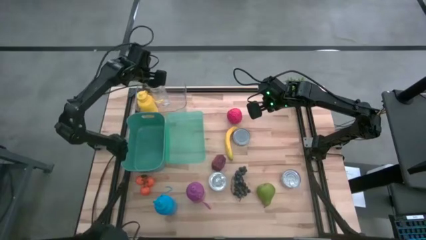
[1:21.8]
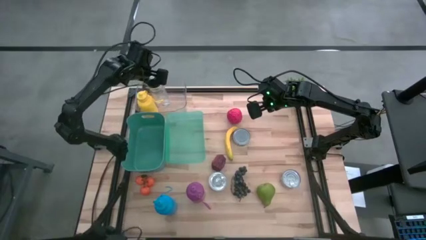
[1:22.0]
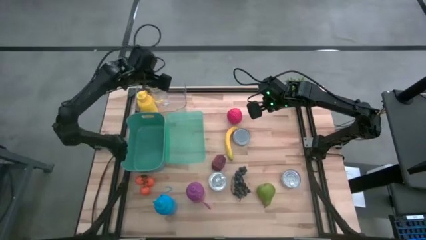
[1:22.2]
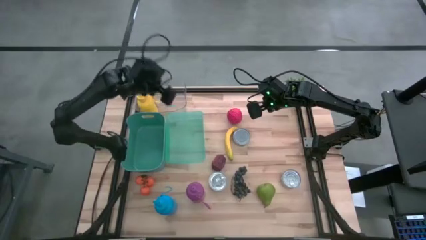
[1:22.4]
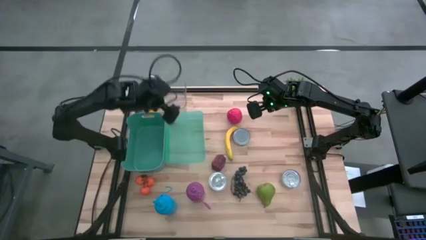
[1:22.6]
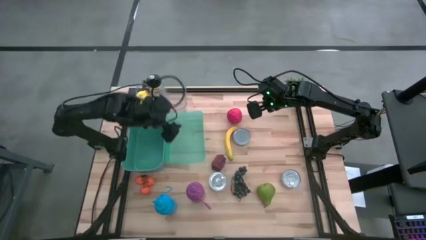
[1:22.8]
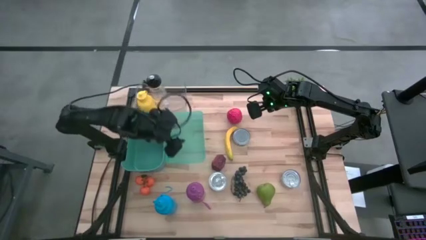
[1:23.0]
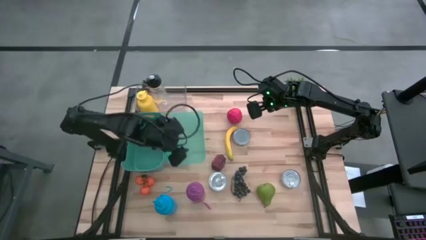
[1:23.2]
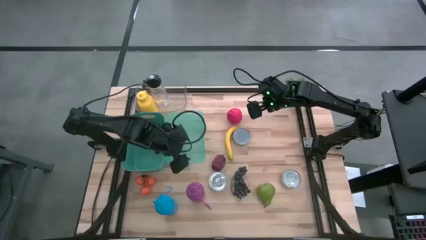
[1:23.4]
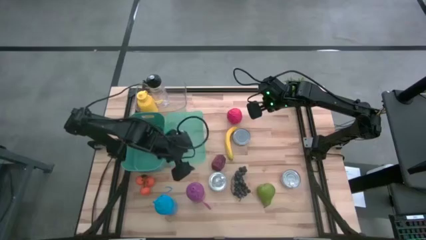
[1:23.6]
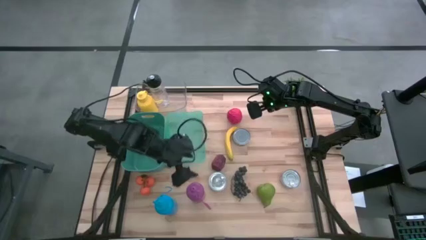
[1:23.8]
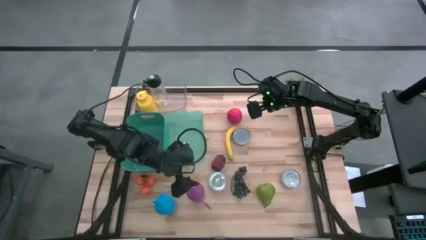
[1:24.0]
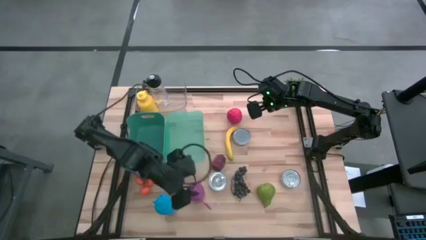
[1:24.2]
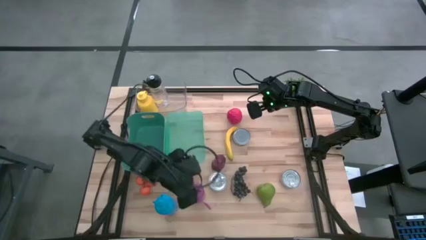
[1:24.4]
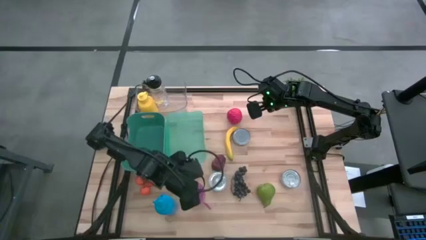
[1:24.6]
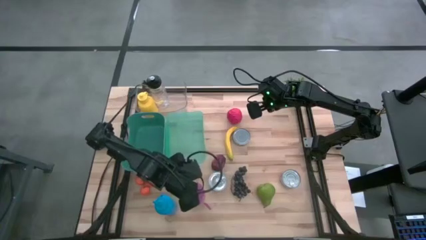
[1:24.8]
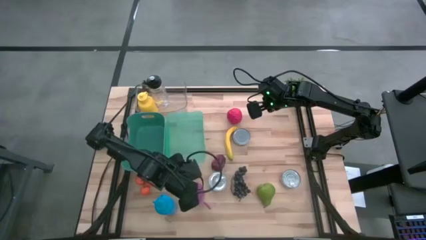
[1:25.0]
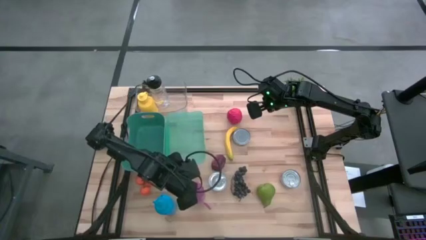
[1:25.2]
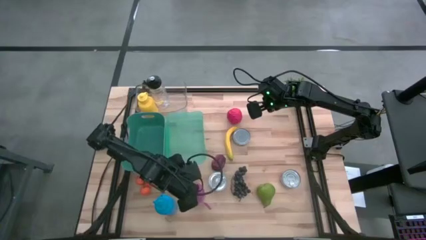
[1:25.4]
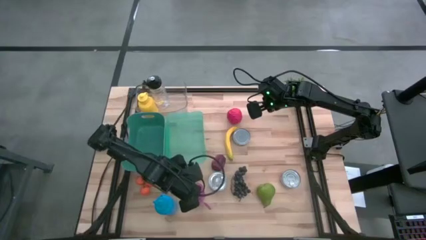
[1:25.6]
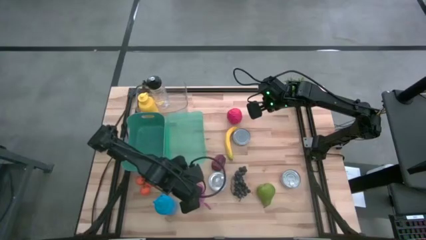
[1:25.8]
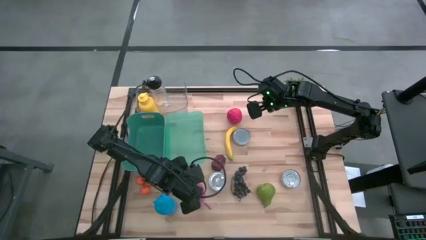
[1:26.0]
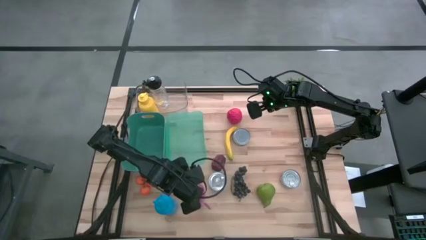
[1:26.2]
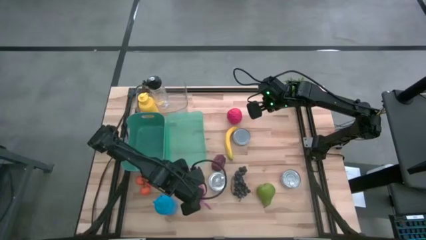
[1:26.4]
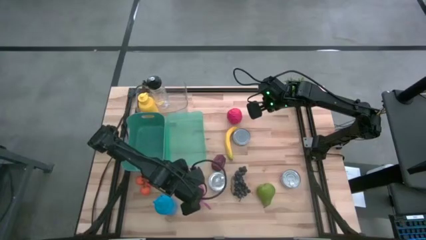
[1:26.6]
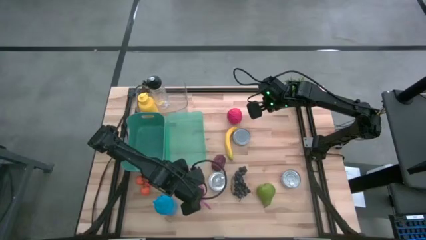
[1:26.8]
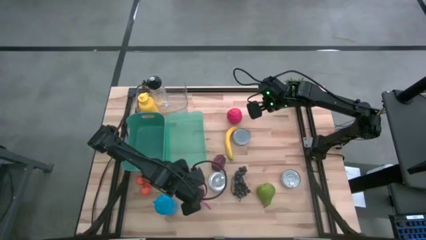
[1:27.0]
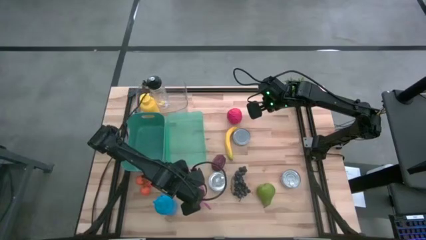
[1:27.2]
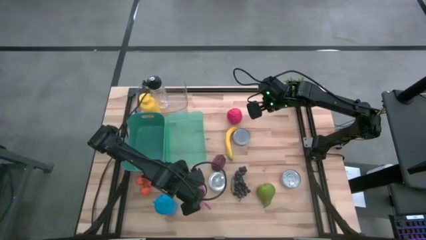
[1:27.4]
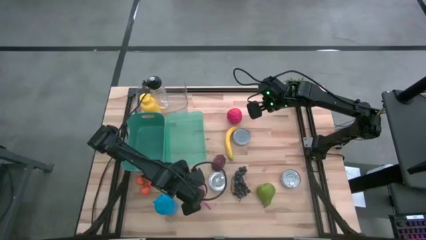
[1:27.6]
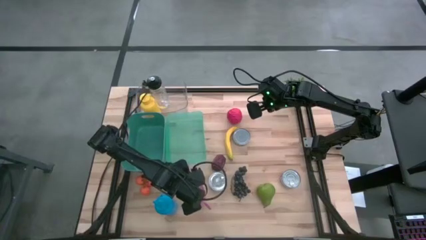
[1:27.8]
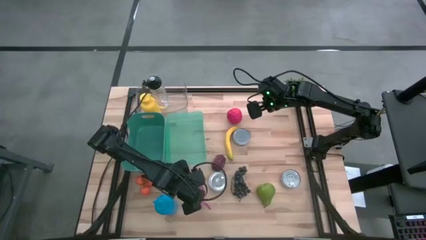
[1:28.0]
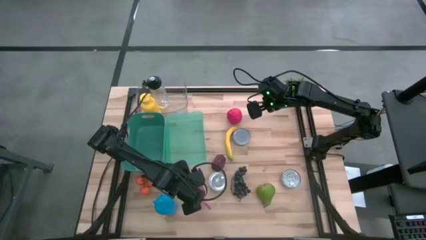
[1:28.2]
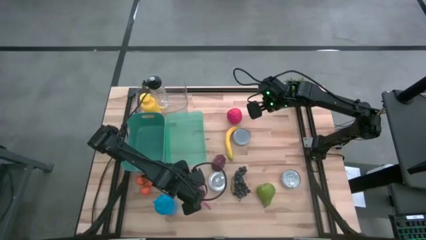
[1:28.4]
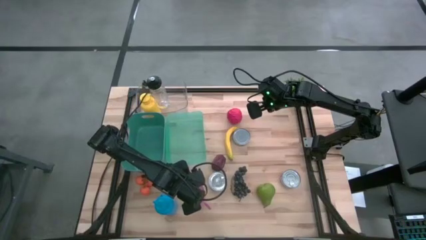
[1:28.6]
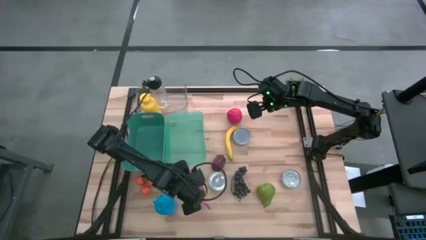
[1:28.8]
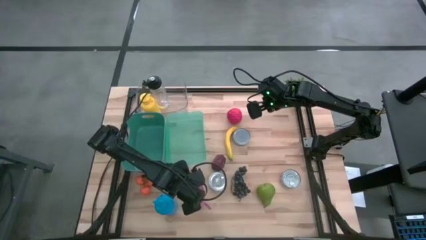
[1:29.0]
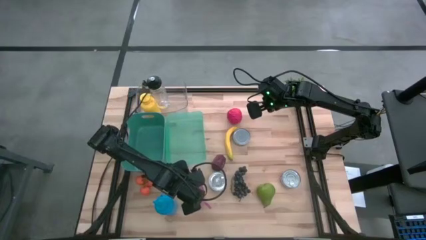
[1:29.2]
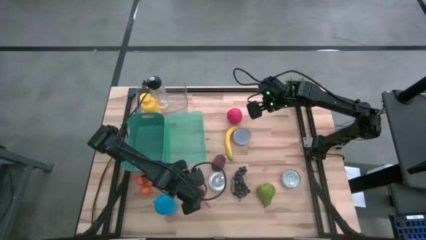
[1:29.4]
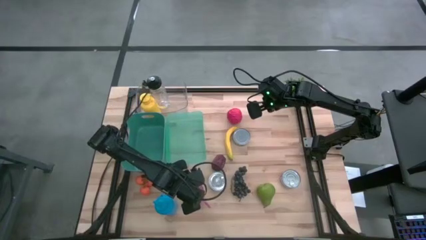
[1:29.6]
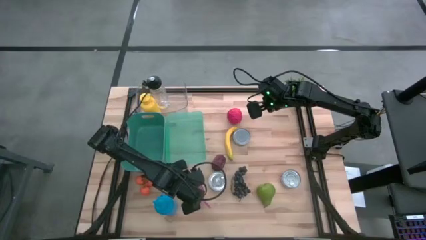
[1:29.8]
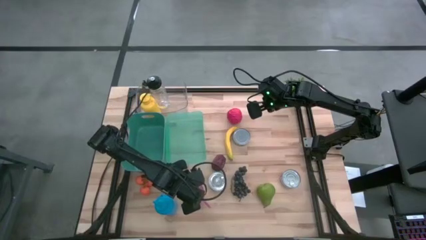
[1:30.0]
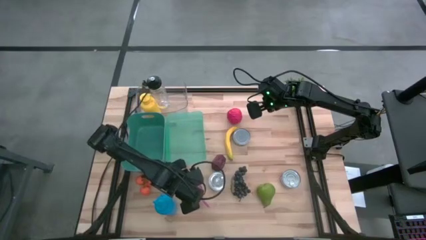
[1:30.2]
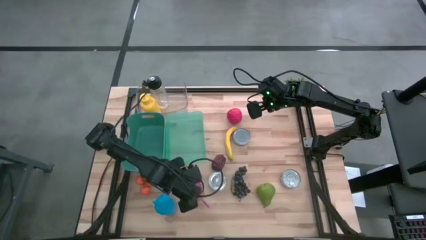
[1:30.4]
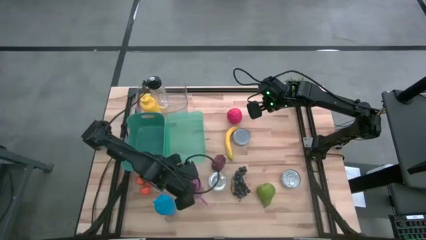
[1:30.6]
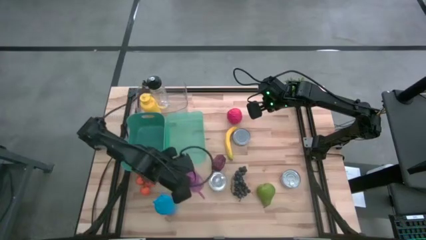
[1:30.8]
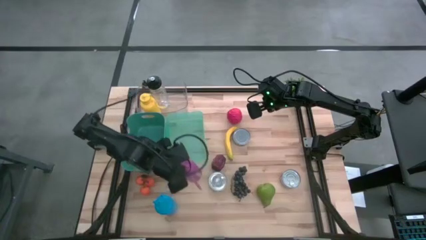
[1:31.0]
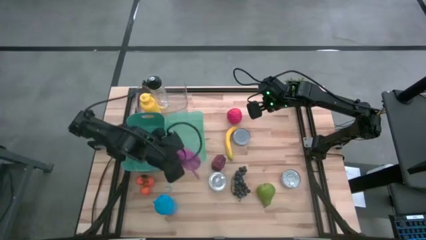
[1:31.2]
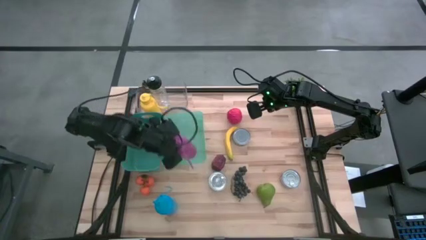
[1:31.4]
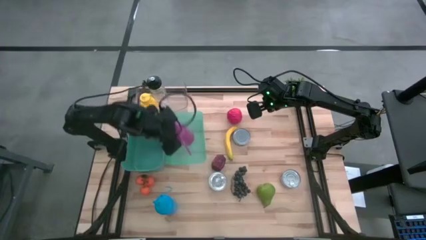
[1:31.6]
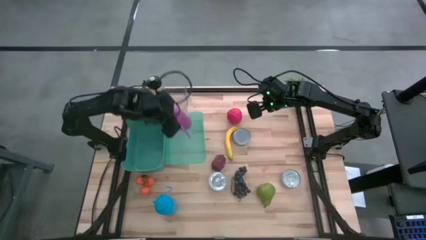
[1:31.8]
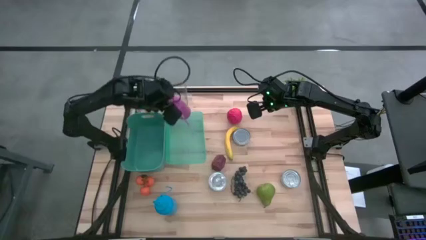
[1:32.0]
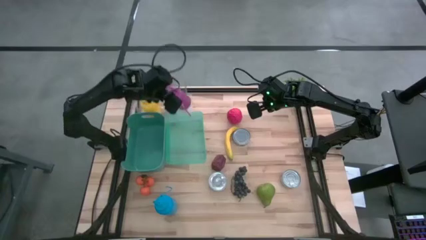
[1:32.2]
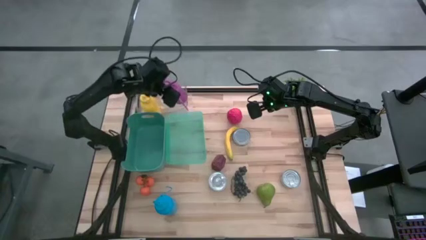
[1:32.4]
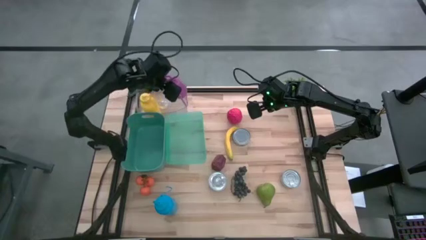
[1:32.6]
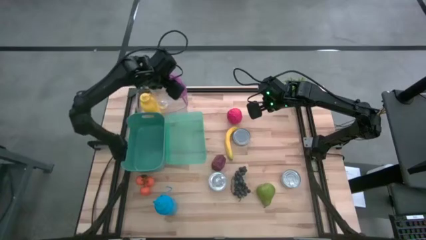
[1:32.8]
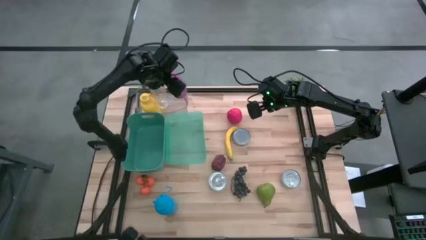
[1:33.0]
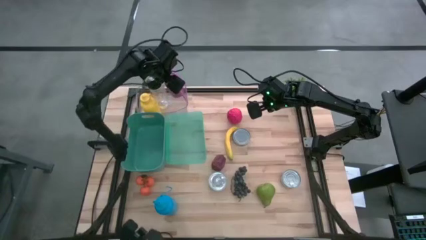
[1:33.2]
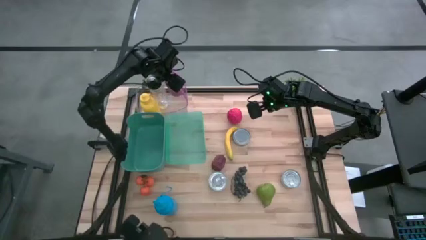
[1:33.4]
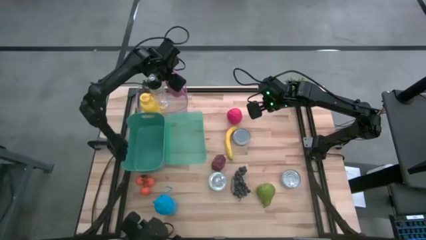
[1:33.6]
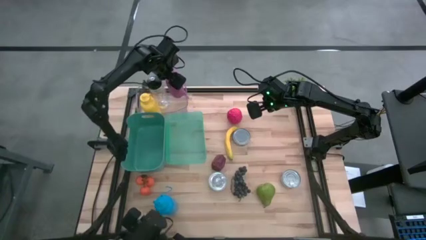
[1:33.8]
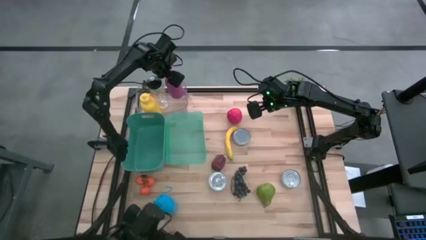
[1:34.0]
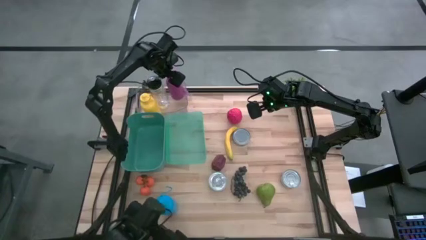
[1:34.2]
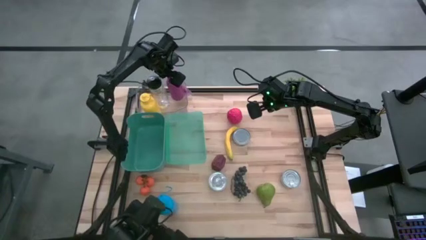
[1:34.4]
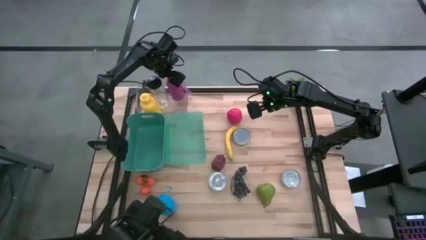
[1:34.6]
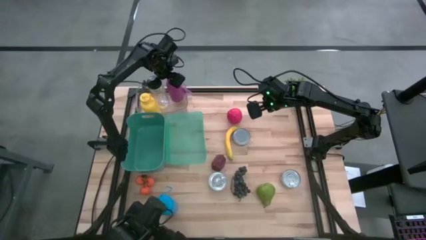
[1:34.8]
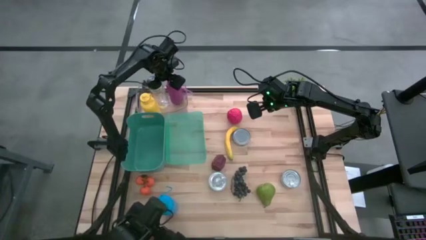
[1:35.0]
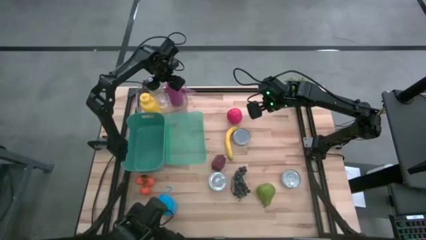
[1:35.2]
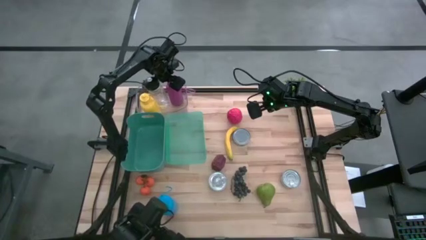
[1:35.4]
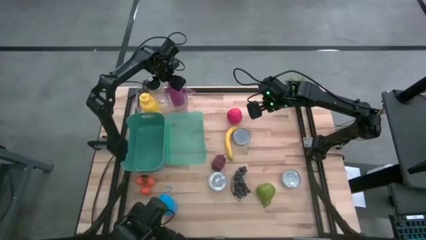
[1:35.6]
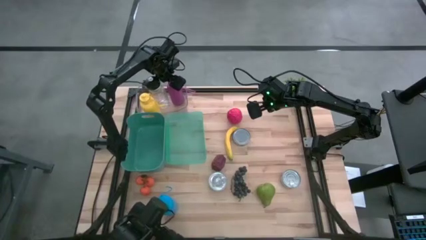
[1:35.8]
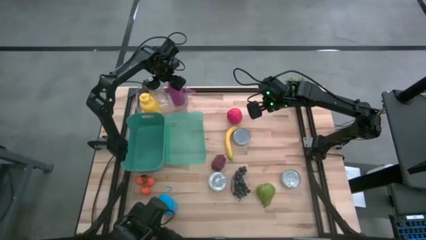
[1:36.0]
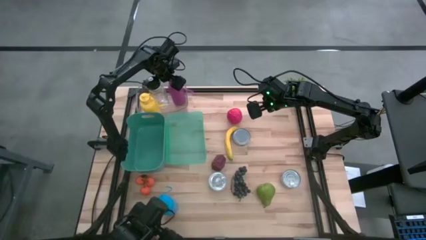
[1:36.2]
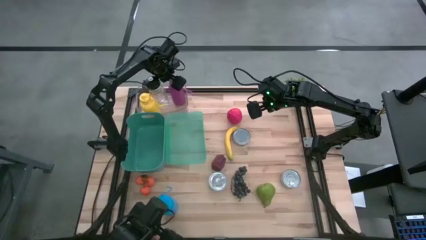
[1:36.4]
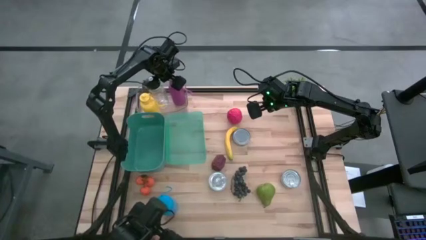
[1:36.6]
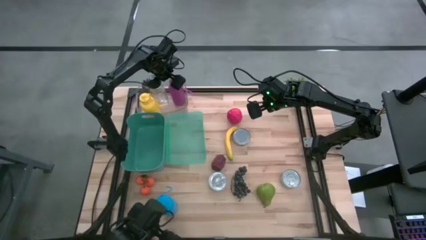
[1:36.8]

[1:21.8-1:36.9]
Task: Pick & Place Food Item
Put the purple water bottle into the transparent bin
